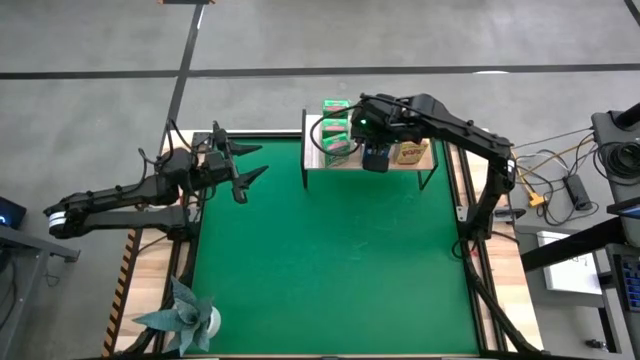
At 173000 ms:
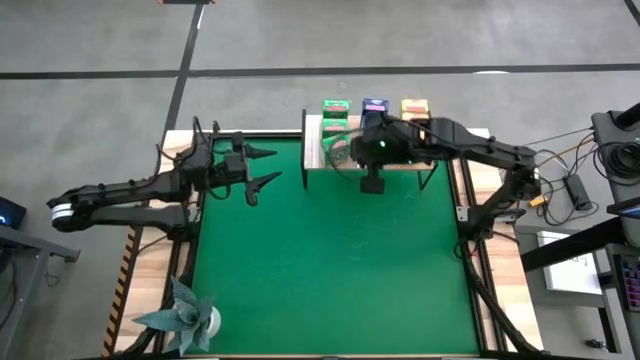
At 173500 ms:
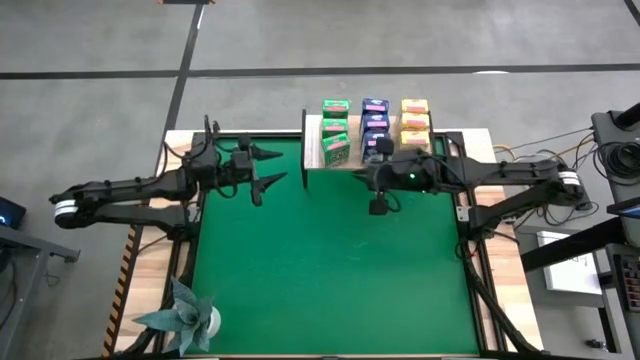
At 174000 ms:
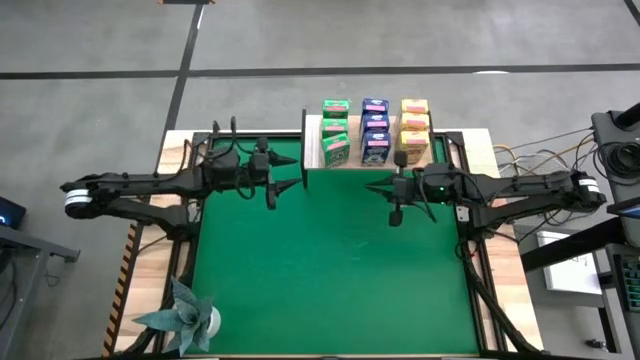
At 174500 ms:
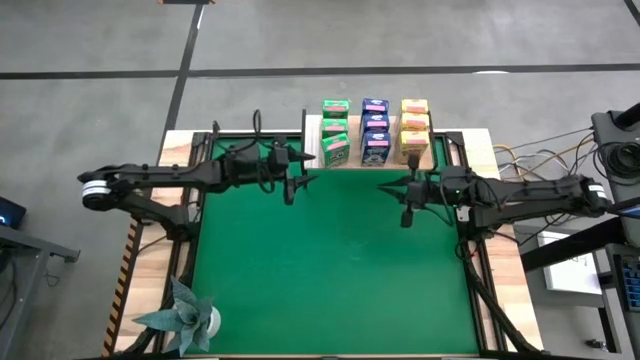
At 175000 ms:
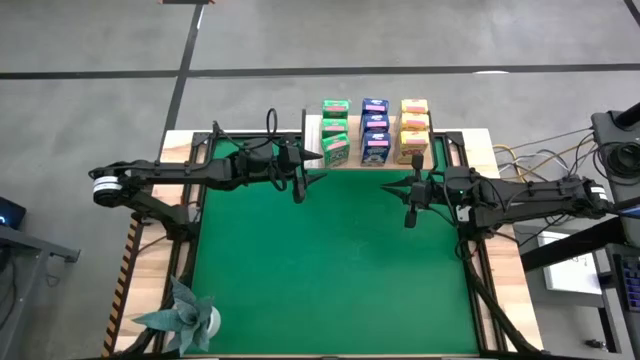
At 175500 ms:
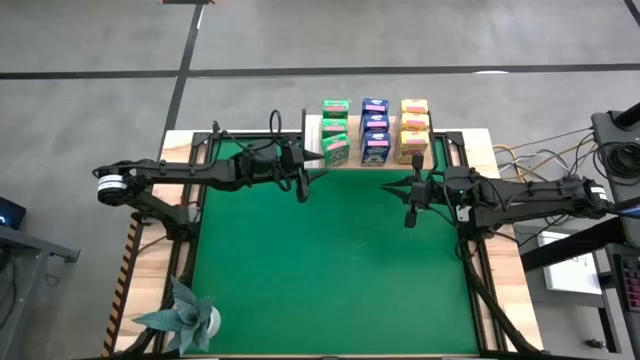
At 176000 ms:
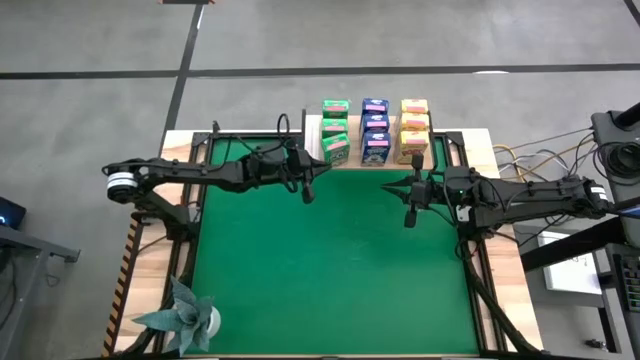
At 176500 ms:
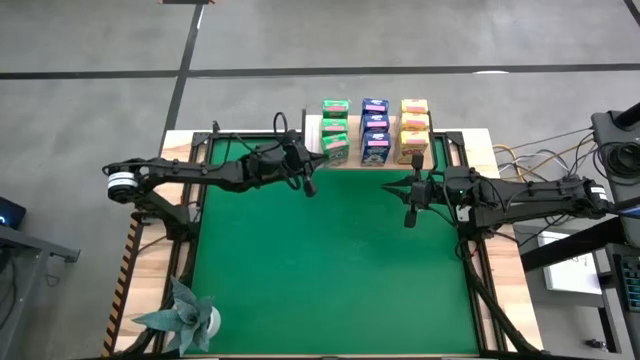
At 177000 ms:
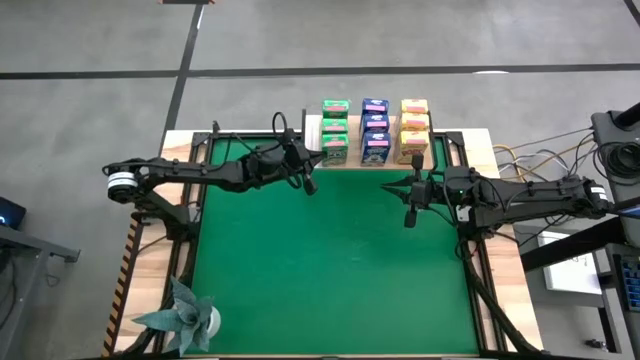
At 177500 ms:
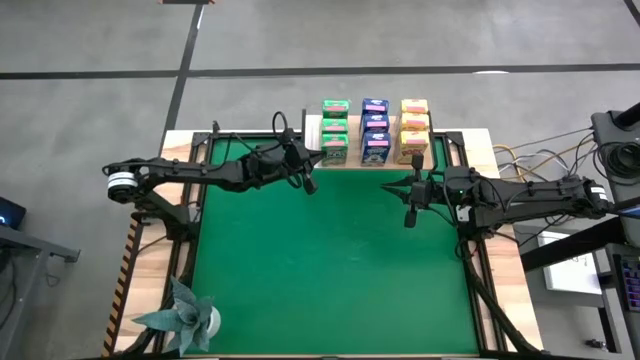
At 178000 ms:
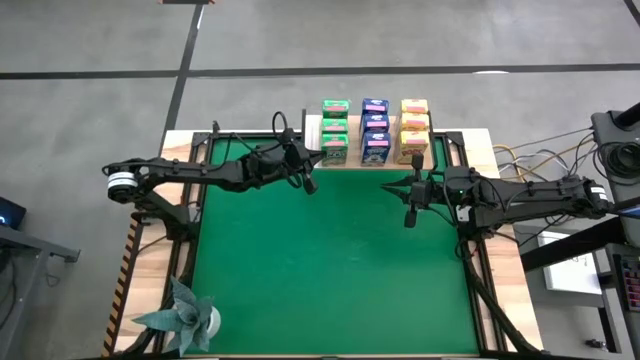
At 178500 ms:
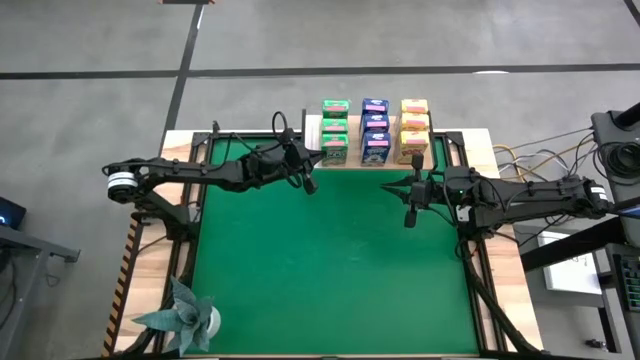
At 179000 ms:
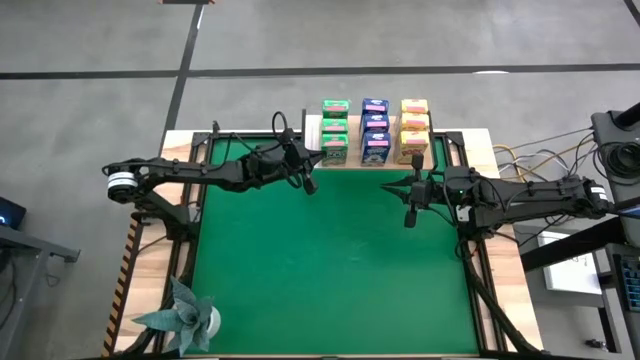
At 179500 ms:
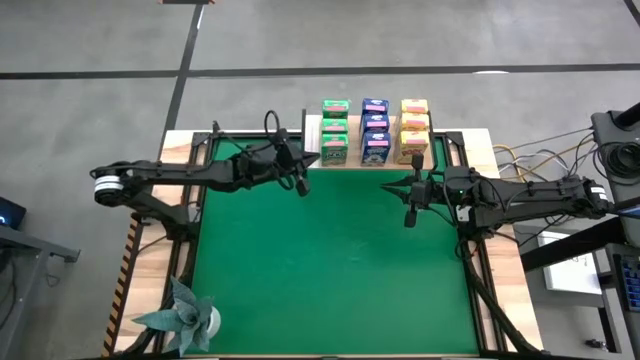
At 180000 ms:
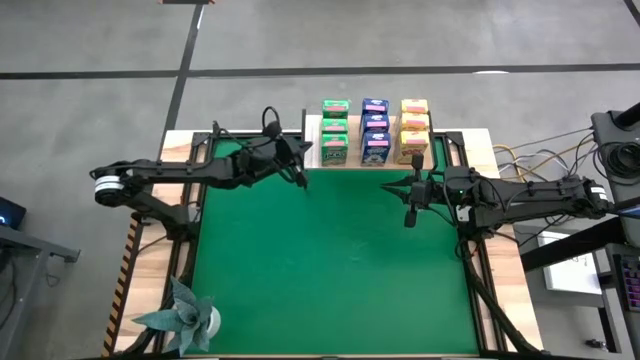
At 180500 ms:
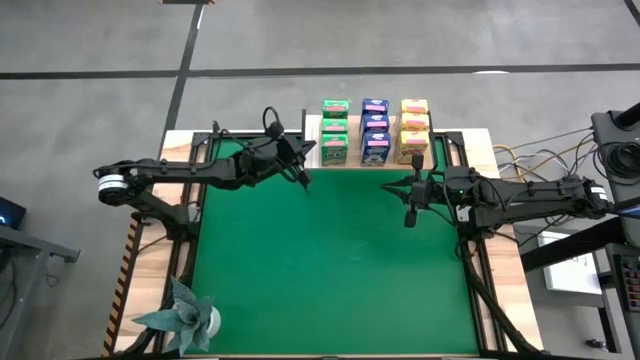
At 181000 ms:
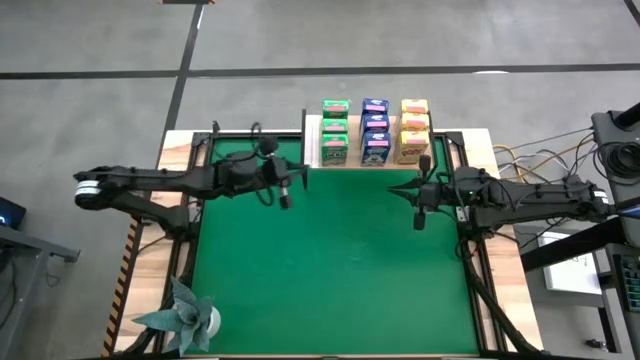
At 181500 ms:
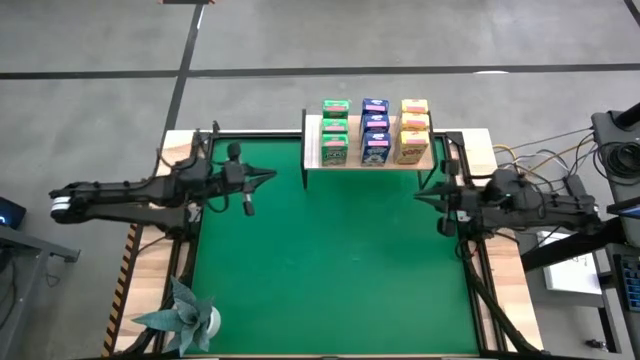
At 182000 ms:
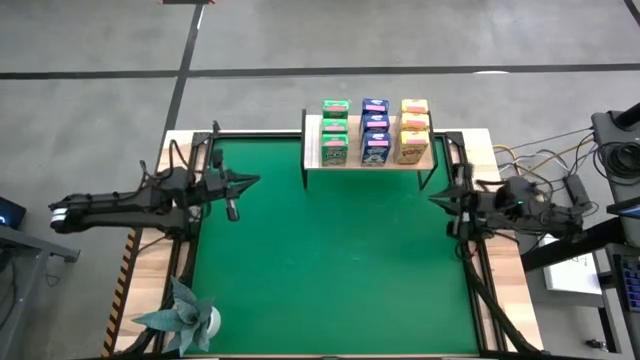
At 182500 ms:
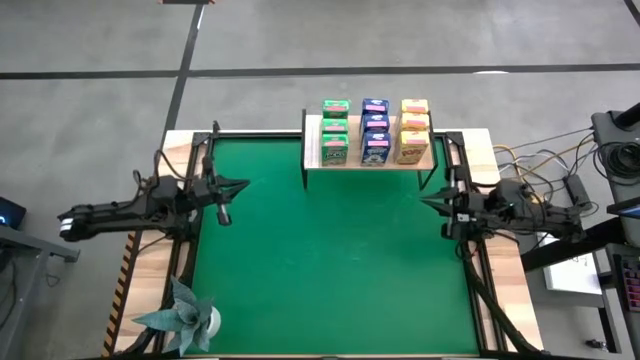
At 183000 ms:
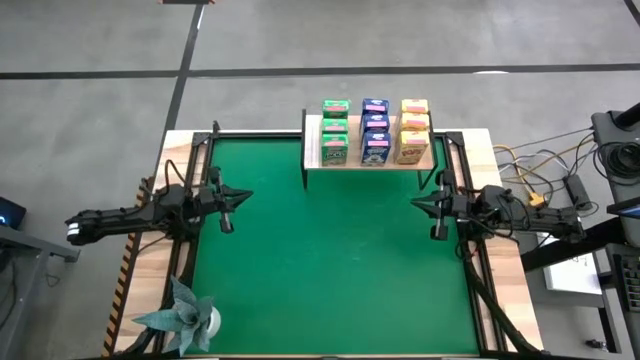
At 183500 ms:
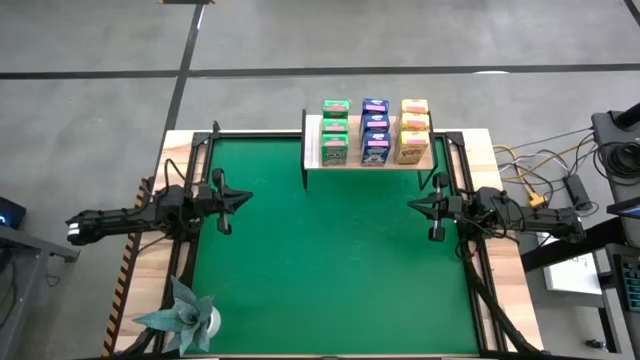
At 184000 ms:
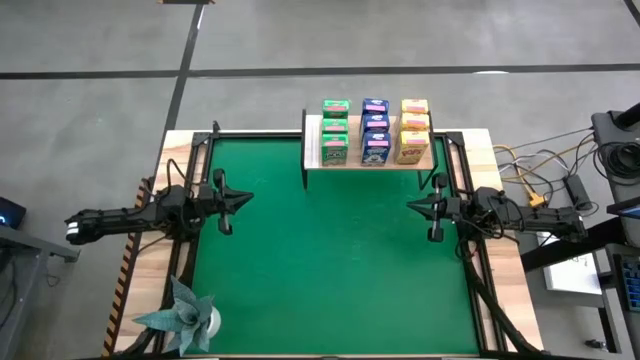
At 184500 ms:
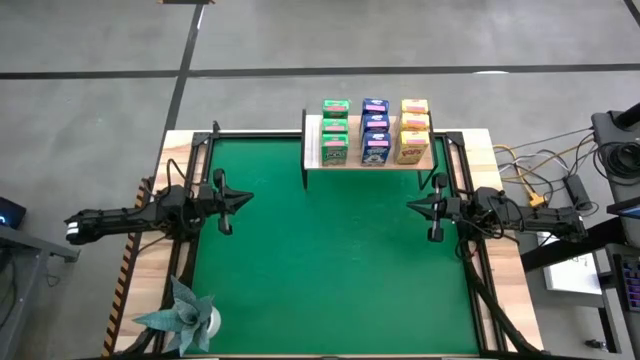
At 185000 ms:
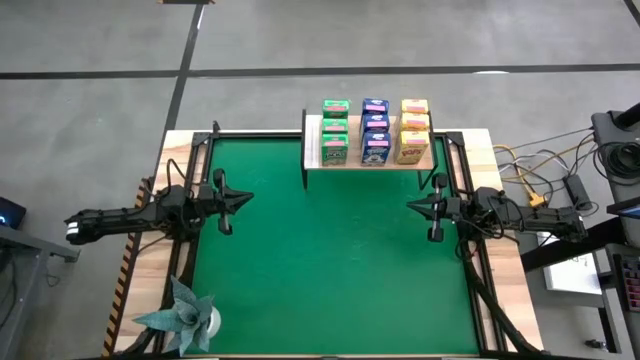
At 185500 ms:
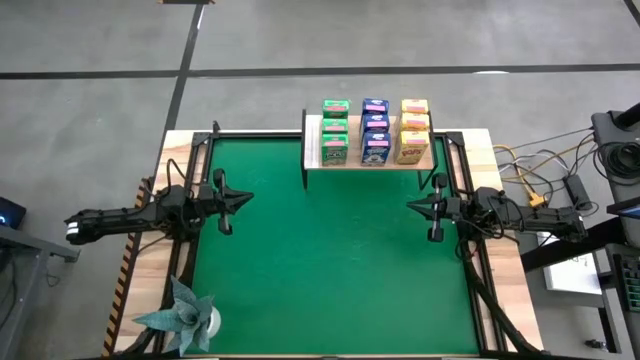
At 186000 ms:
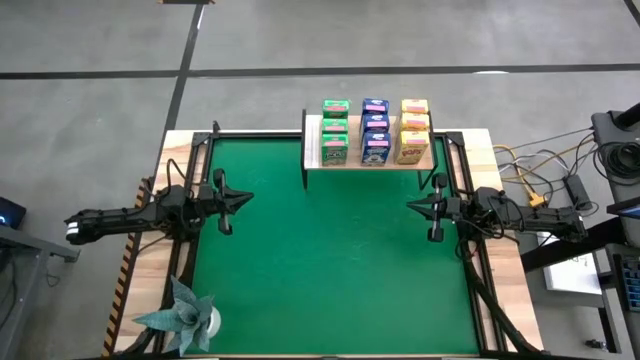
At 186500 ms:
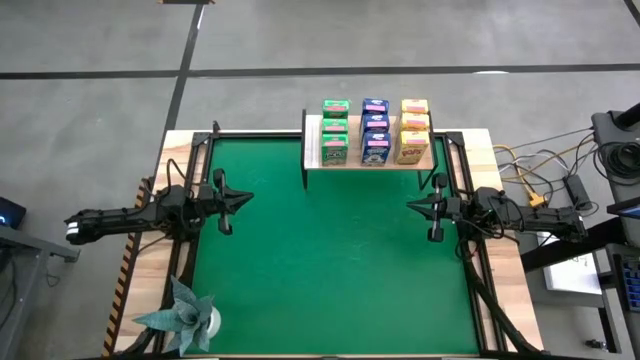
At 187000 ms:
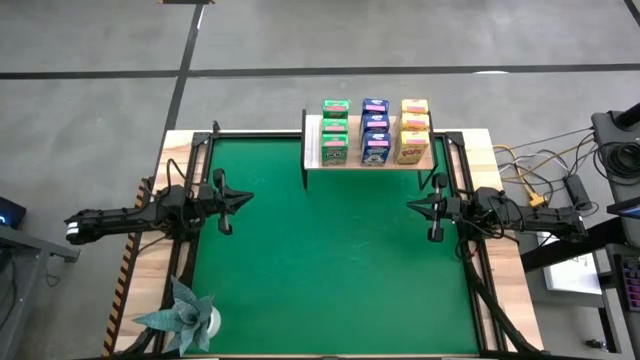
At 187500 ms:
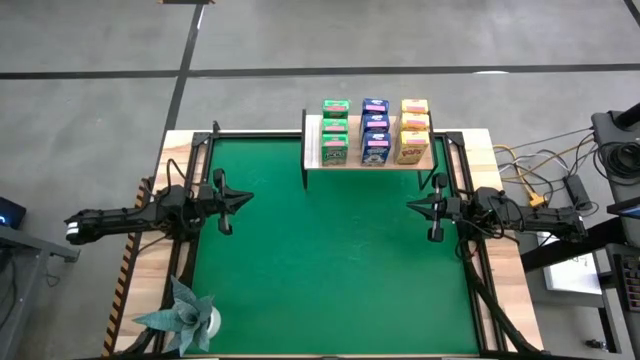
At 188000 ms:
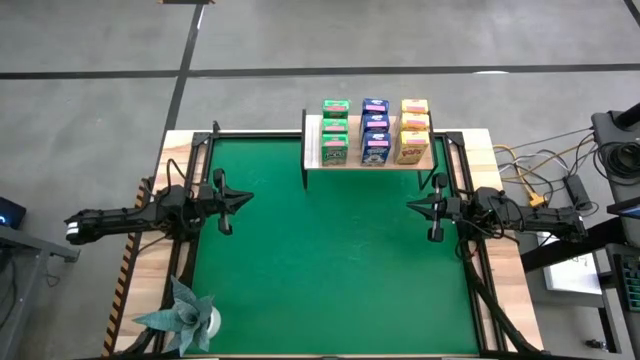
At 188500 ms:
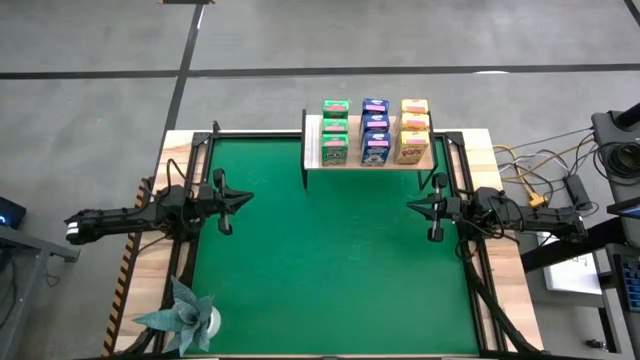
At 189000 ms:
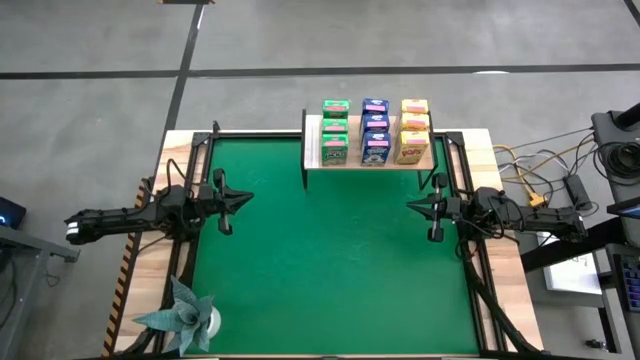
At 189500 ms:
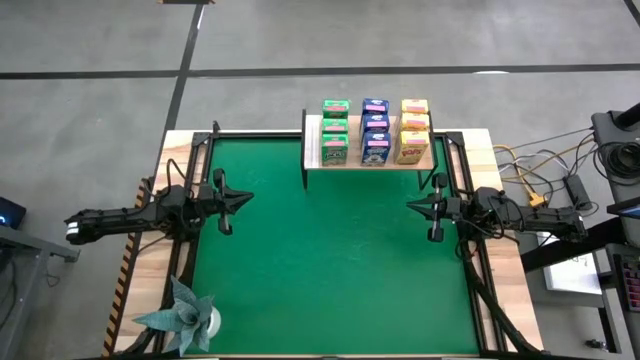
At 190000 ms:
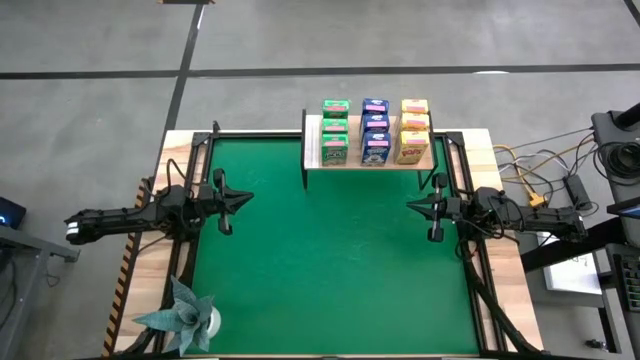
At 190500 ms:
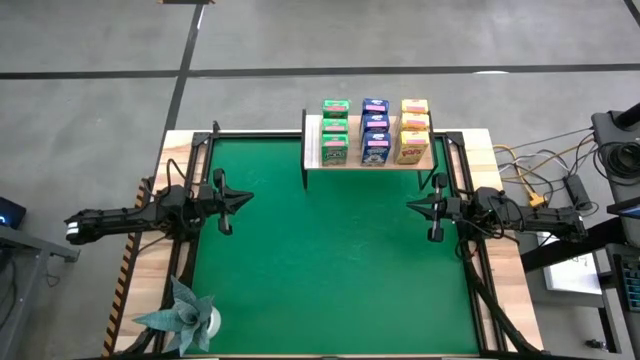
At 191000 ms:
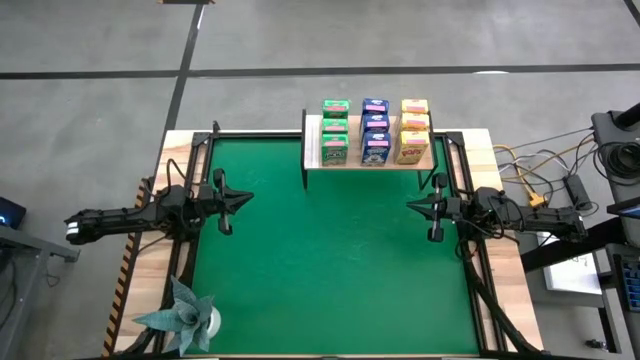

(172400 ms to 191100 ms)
Task: Stack cereal on shelf
Return to Home Position

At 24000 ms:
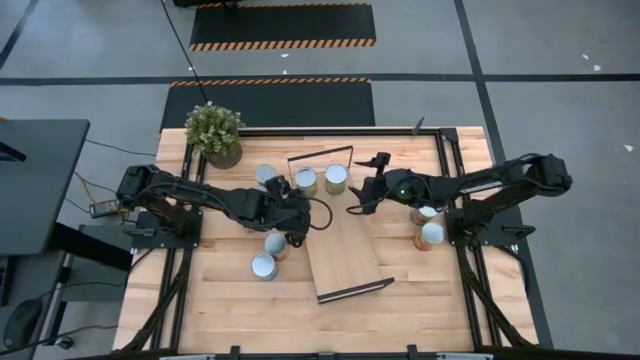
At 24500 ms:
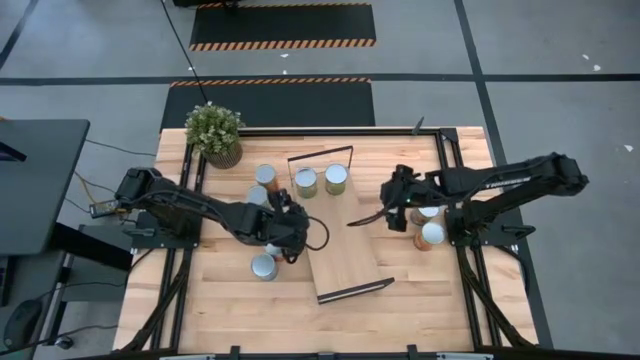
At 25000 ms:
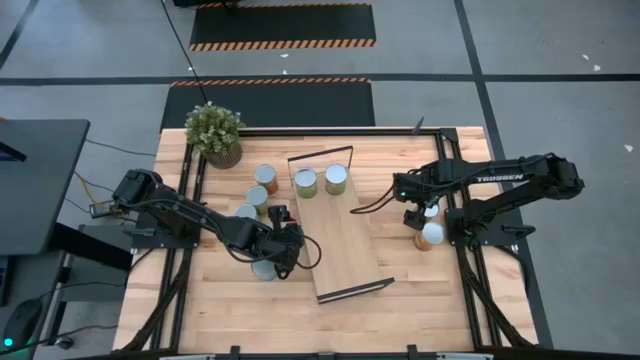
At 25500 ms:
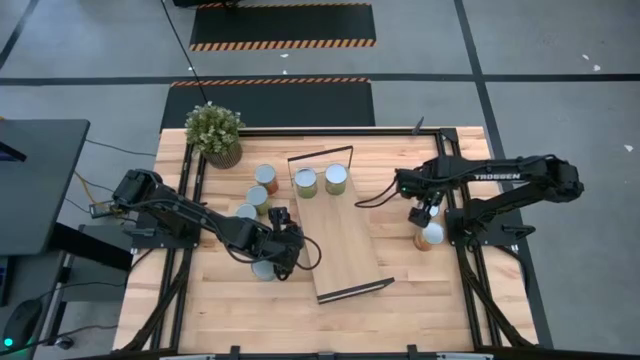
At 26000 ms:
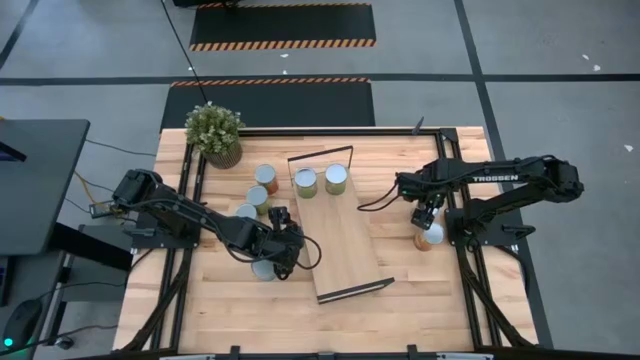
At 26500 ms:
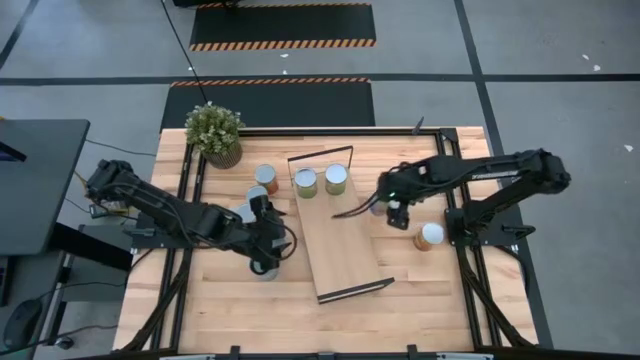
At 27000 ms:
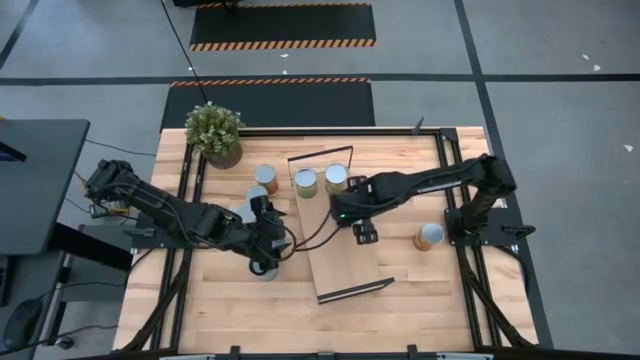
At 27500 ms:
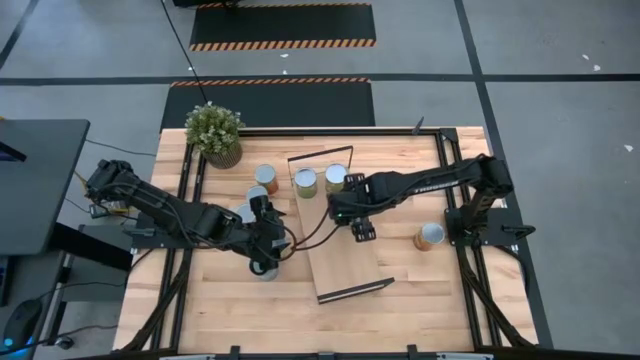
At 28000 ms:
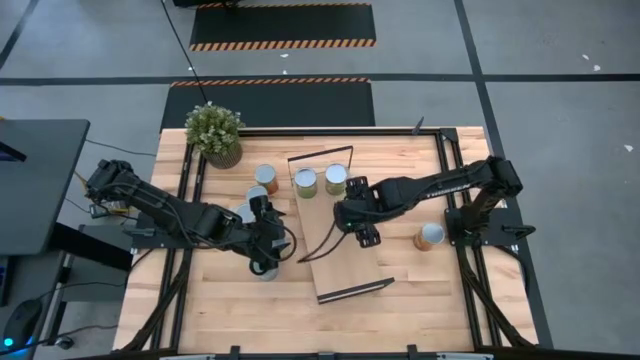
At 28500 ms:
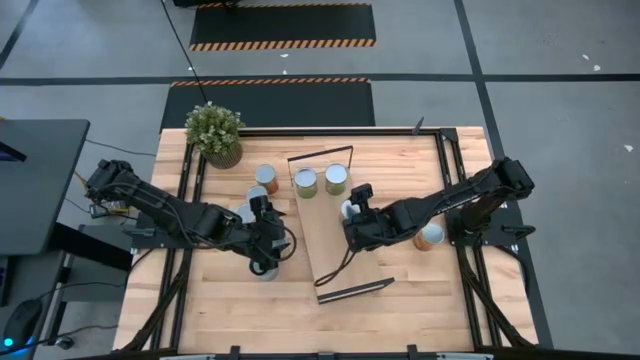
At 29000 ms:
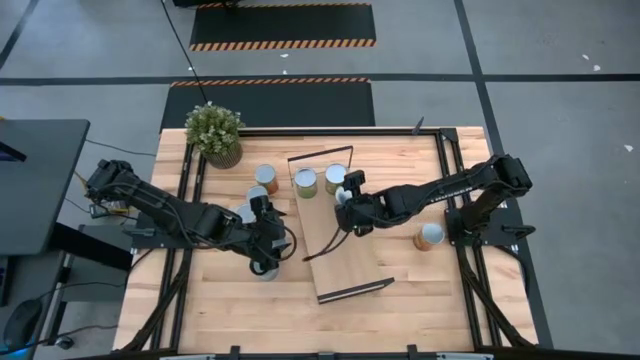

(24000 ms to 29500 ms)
Task: Pick and place cans onto a shelf
Put the canned tomatoes on the shelf
